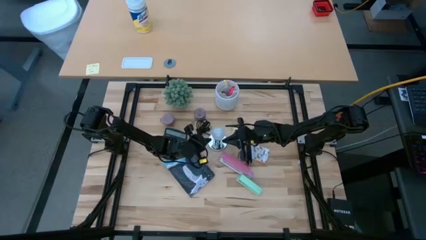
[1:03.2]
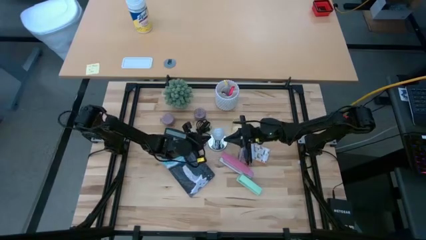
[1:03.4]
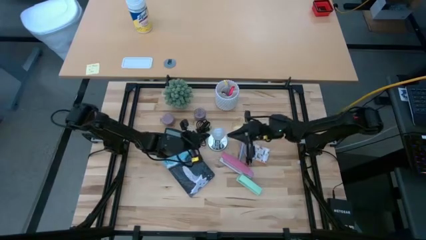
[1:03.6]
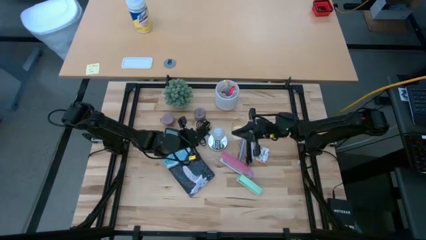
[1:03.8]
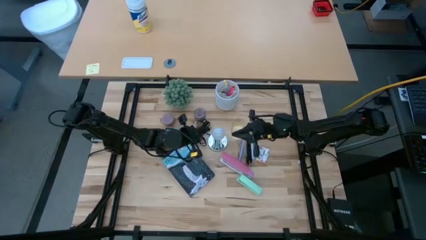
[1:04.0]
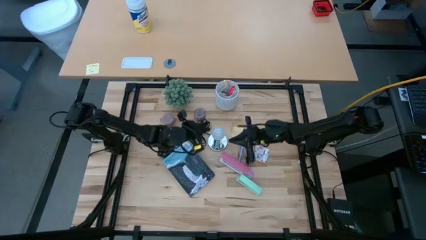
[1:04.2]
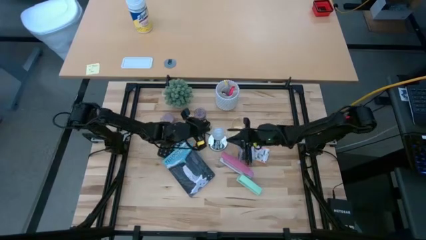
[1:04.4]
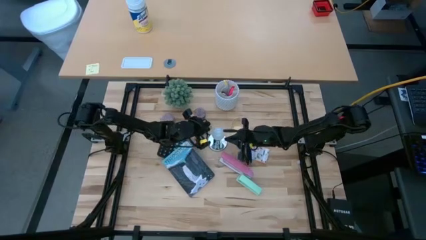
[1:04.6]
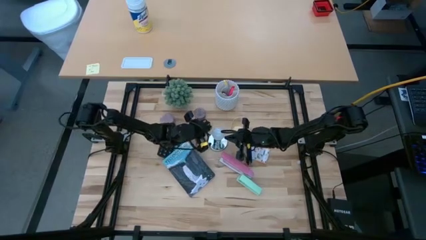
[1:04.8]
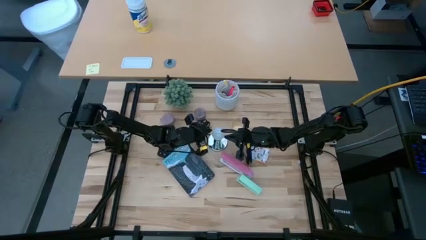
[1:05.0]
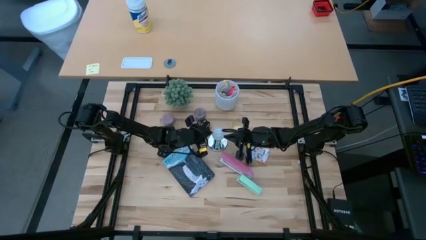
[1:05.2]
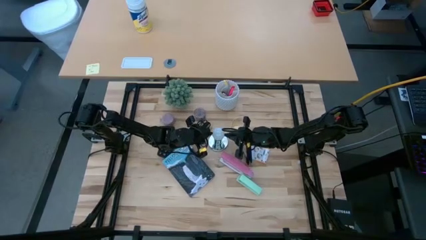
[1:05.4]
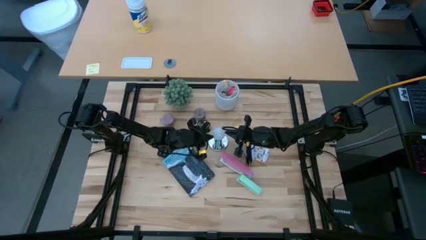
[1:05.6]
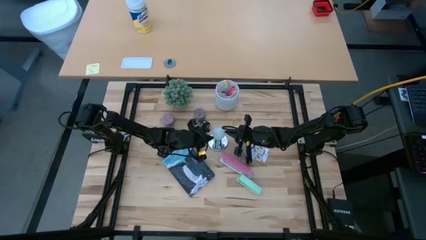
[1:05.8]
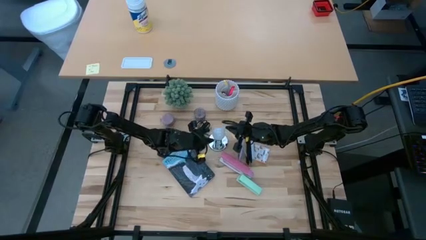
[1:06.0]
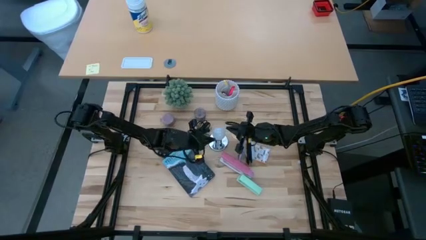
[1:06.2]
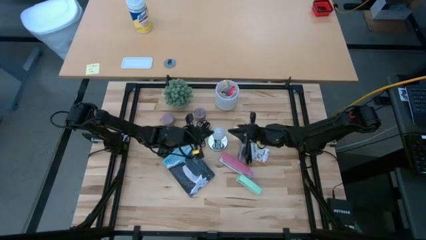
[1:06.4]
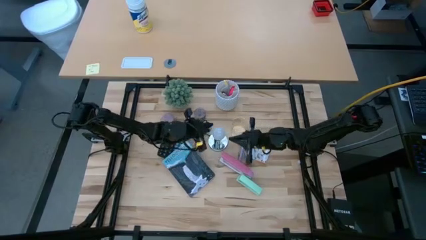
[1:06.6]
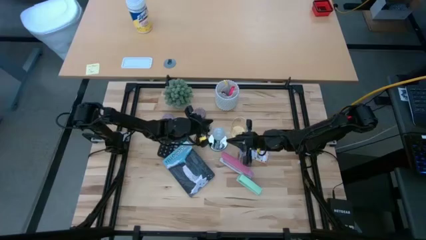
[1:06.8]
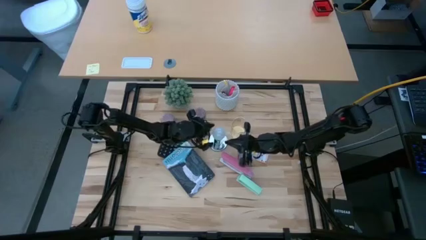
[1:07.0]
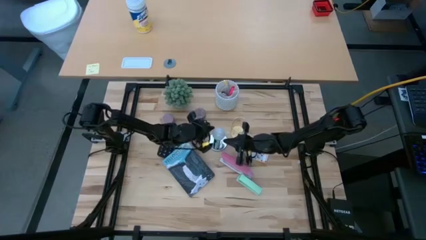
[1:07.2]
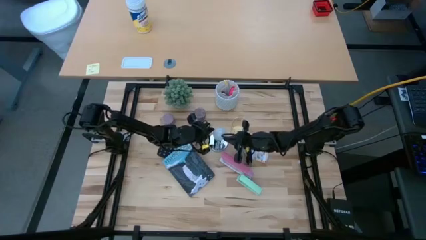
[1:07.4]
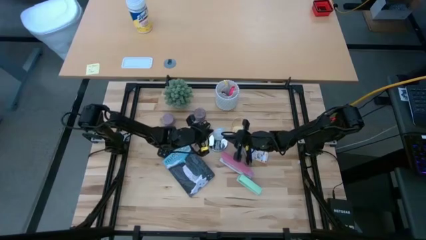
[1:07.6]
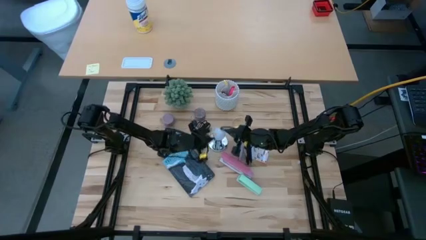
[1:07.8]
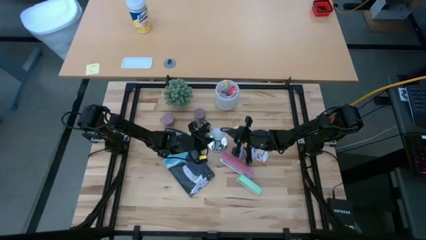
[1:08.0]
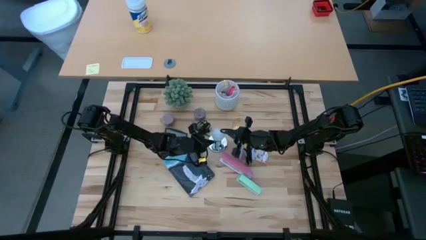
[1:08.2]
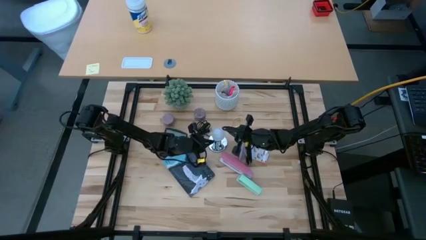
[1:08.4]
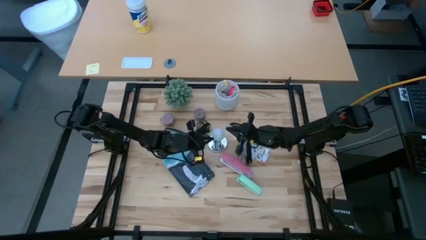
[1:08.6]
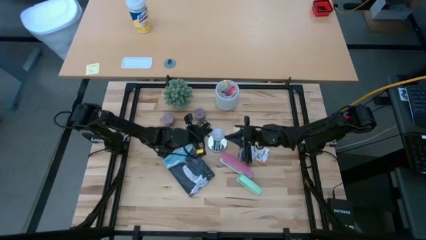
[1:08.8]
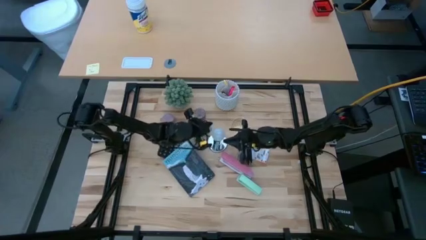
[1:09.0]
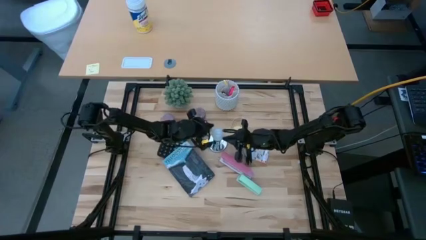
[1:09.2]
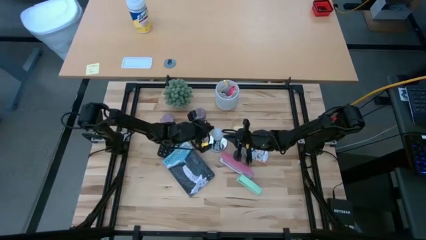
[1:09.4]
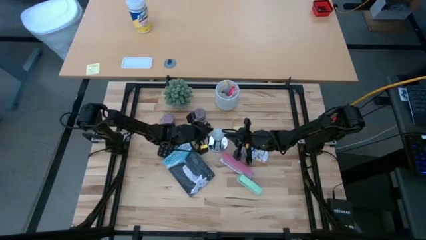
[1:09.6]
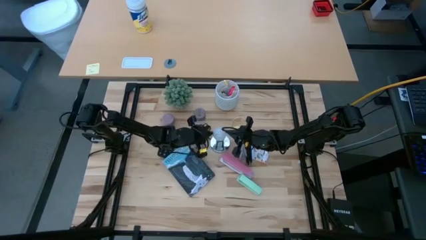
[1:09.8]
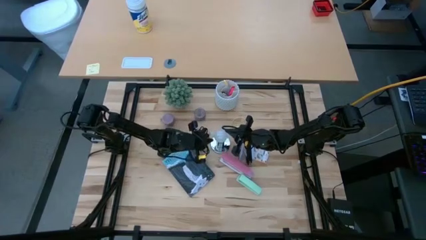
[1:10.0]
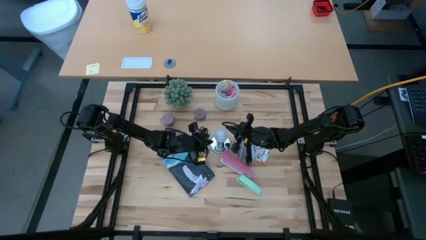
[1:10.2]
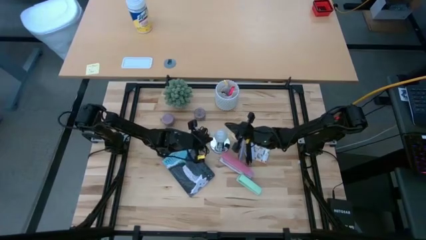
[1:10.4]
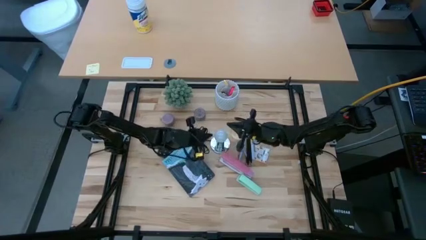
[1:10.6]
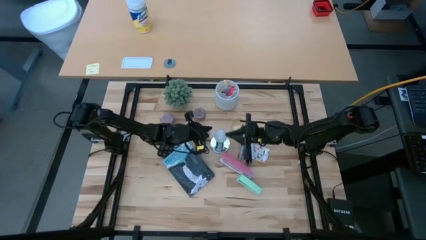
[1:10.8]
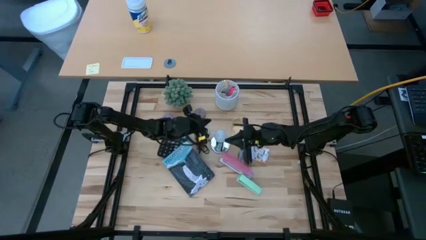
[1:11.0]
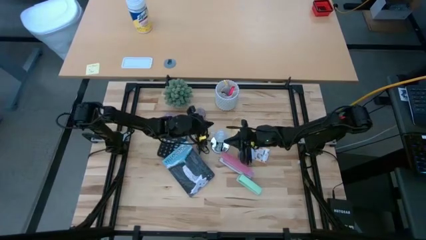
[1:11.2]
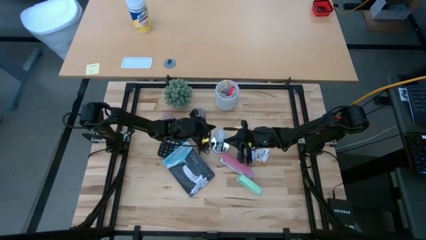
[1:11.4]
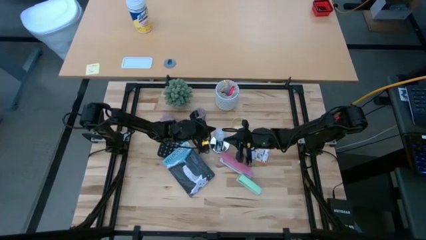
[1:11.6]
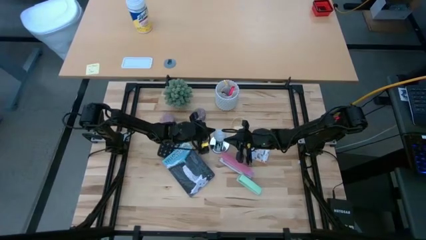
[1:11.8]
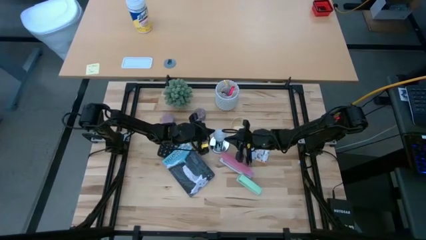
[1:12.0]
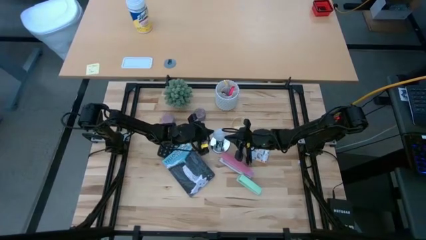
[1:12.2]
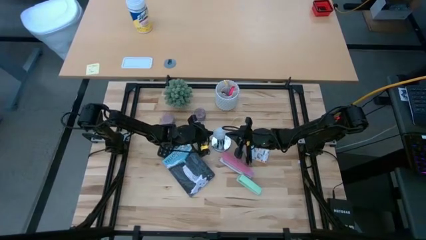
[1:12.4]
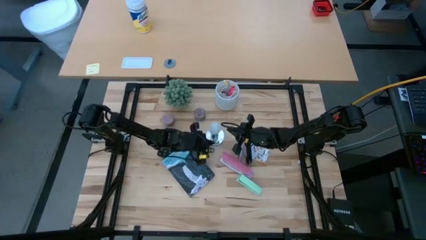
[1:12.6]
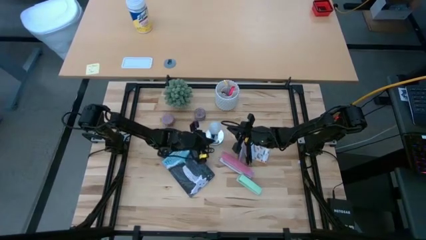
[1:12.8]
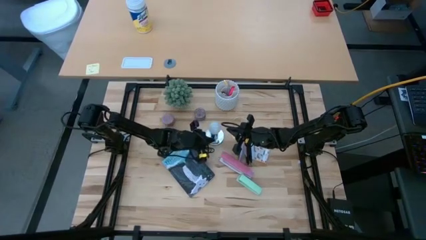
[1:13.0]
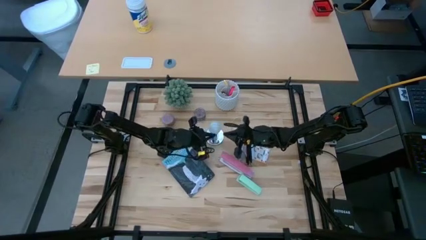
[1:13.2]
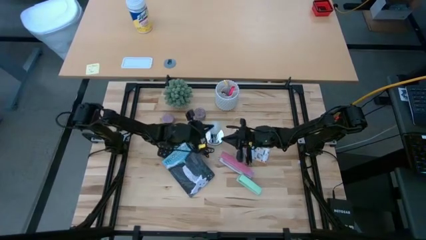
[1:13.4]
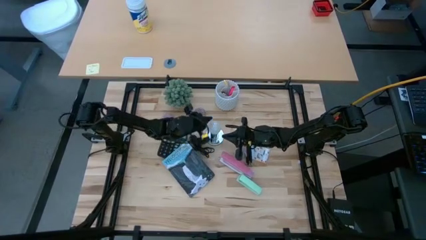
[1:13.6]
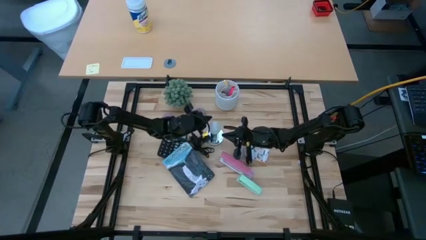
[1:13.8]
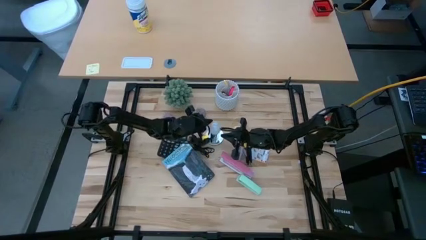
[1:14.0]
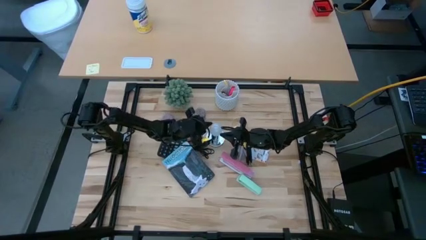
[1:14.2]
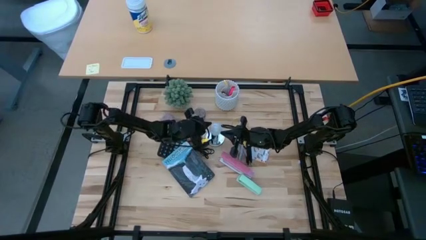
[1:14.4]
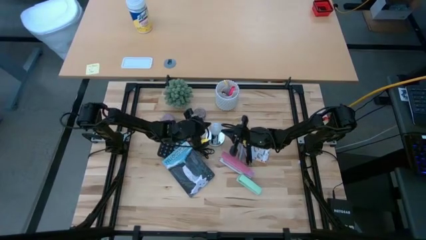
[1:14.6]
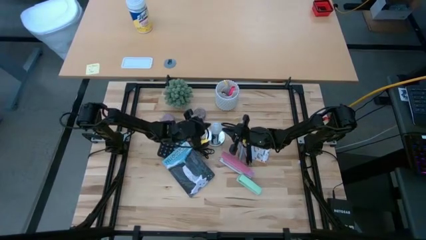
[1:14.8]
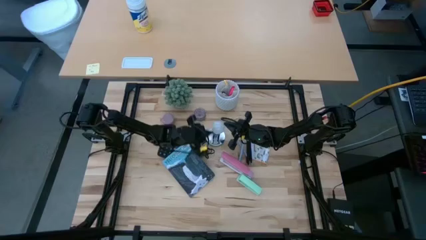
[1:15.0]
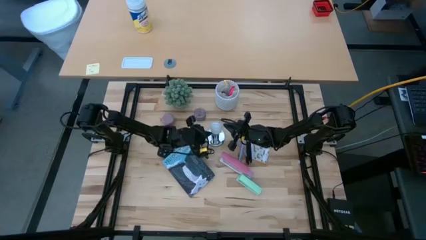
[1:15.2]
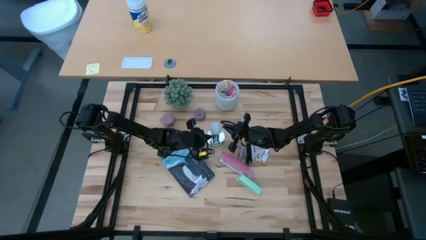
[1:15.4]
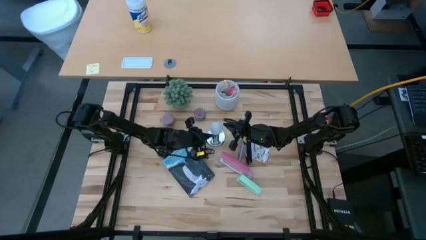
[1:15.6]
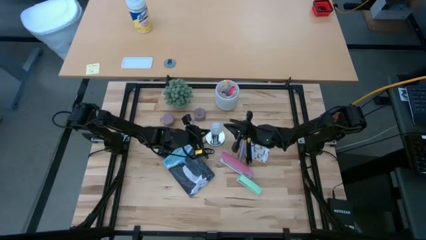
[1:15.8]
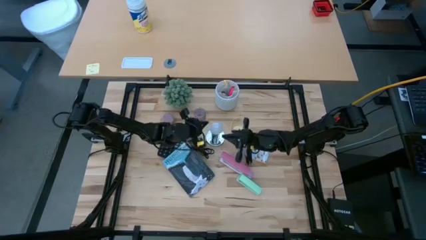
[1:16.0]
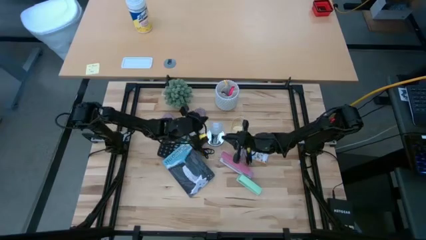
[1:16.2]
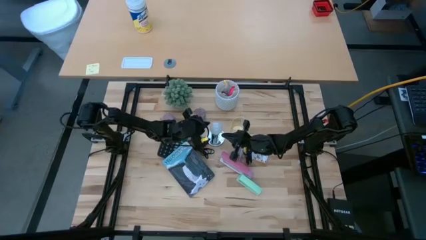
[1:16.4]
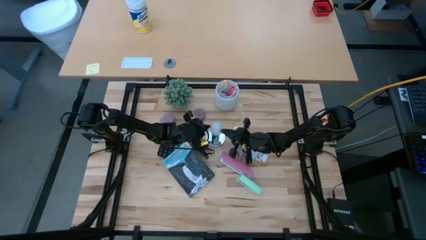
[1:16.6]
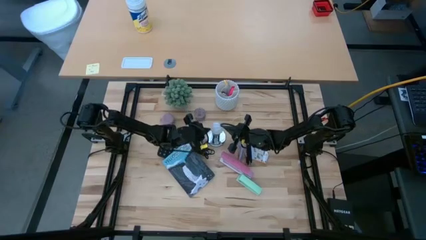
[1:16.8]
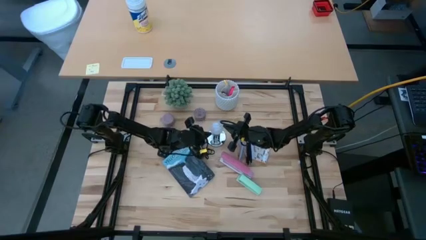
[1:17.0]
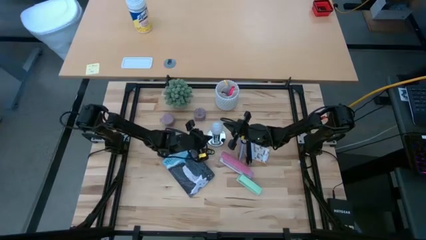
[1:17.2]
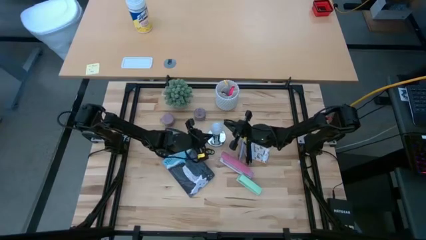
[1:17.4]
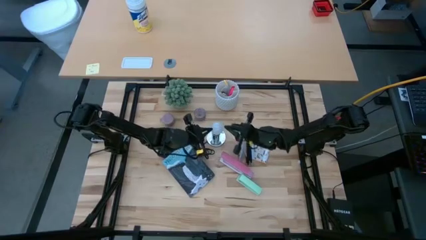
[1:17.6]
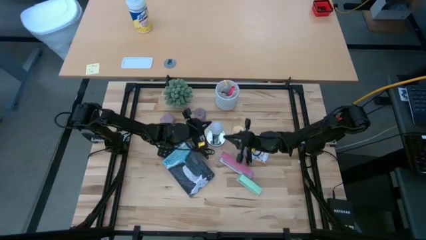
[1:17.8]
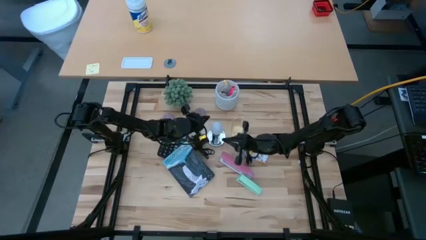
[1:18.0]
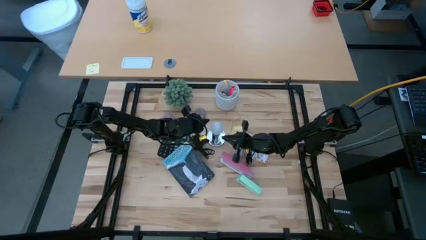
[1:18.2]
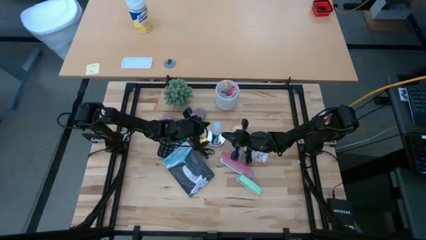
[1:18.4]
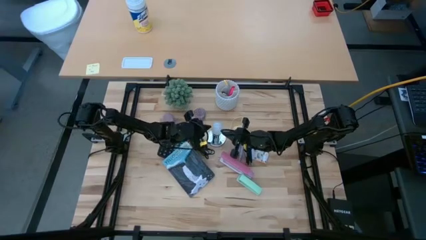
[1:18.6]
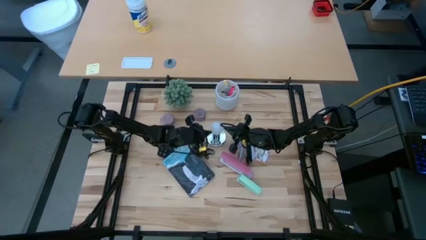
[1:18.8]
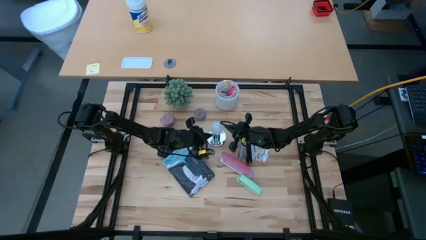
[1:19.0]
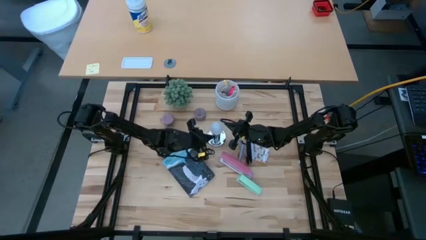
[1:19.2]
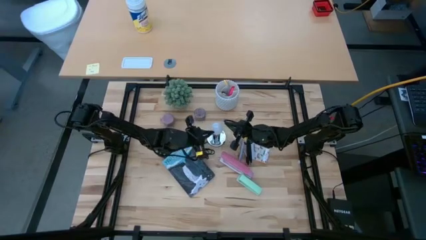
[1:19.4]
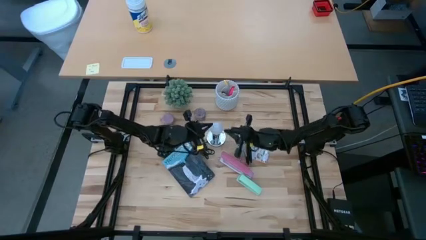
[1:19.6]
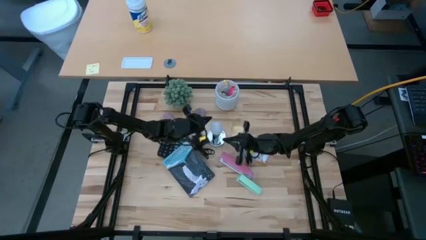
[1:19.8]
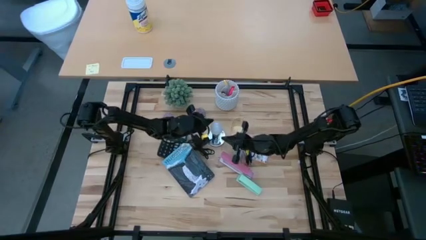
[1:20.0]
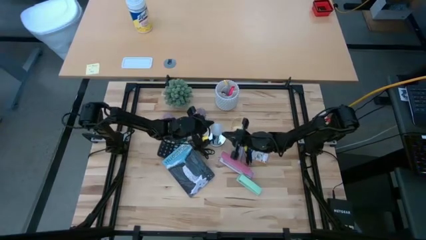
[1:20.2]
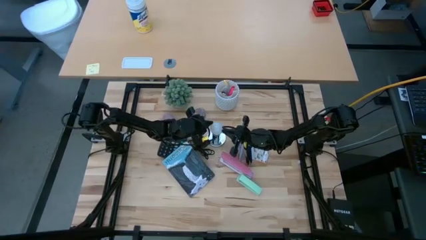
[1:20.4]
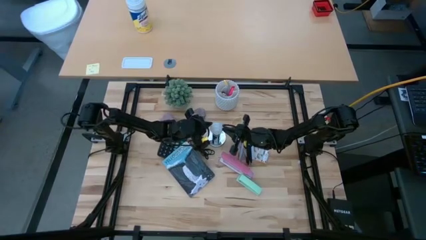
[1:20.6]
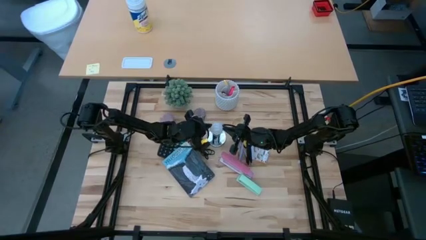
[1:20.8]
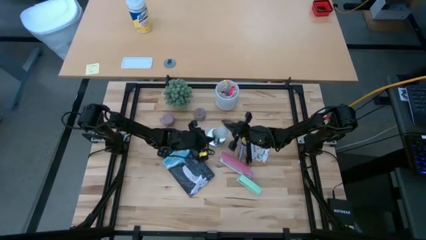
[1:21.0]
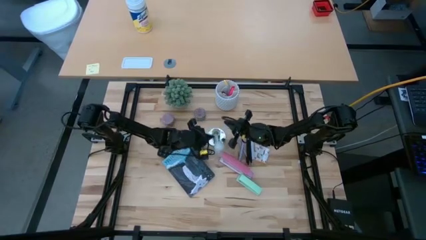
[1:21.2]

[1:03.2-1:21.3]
Task: Screw lightbulb
Remove the white lightbulb from the silver lamp
